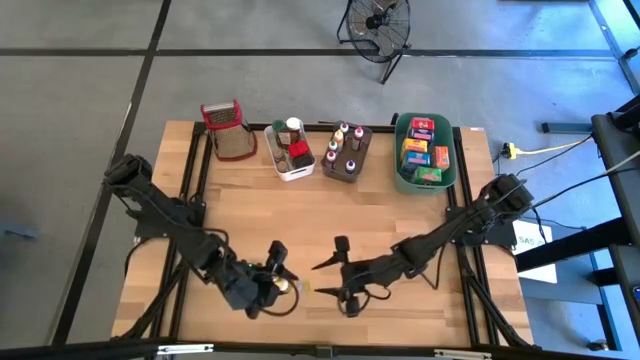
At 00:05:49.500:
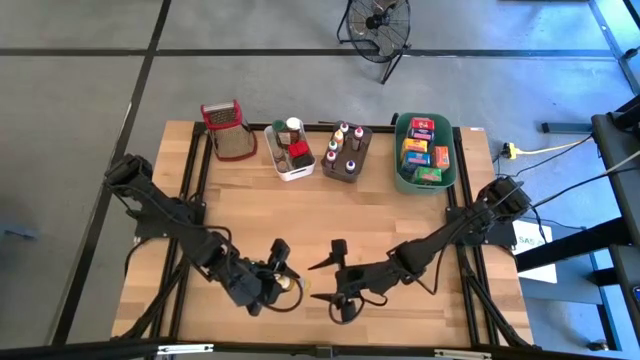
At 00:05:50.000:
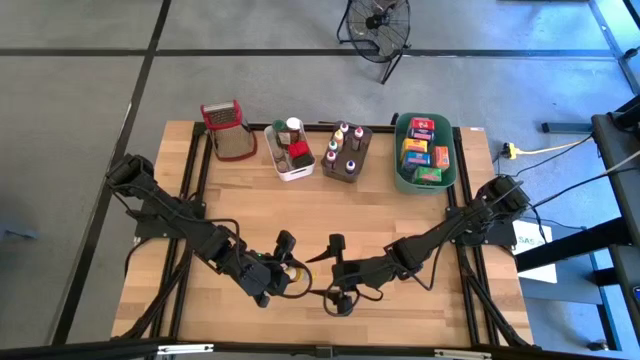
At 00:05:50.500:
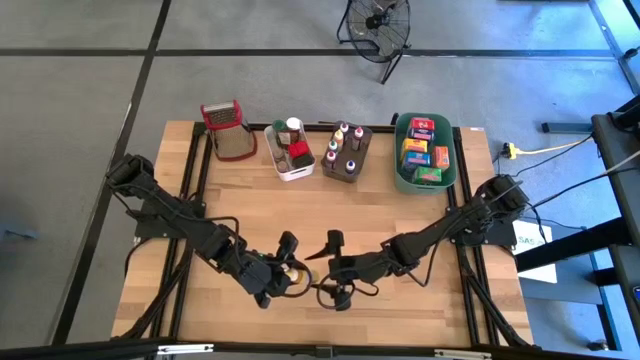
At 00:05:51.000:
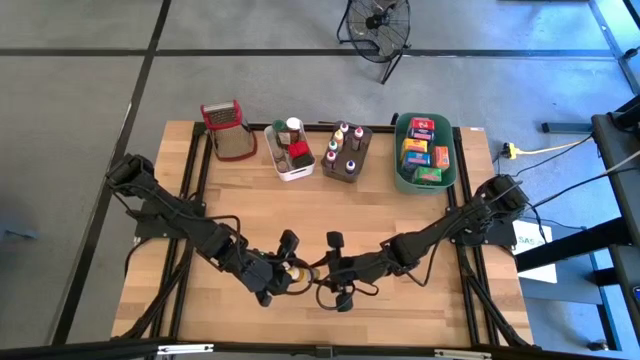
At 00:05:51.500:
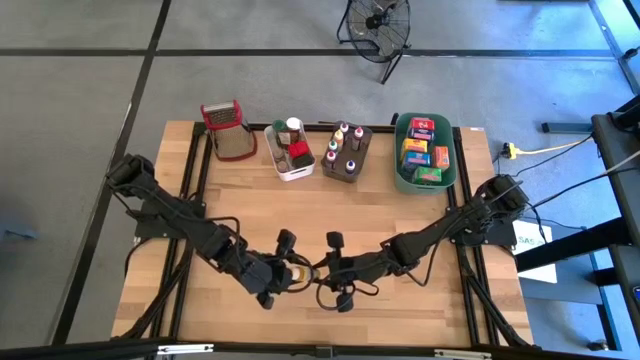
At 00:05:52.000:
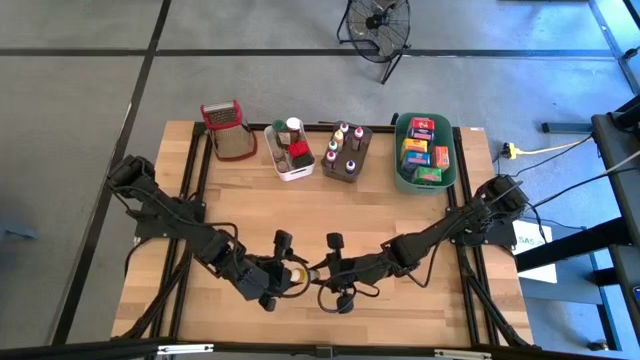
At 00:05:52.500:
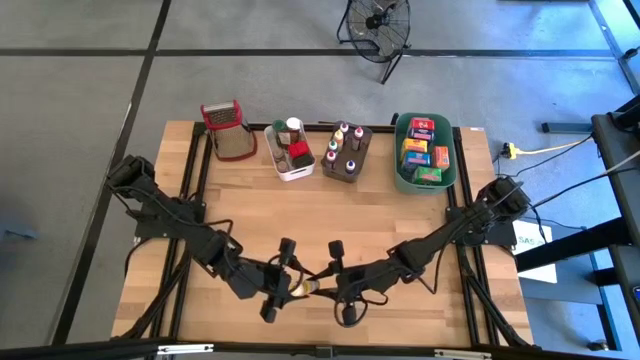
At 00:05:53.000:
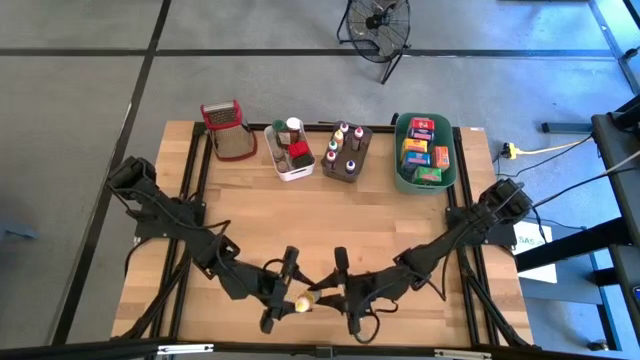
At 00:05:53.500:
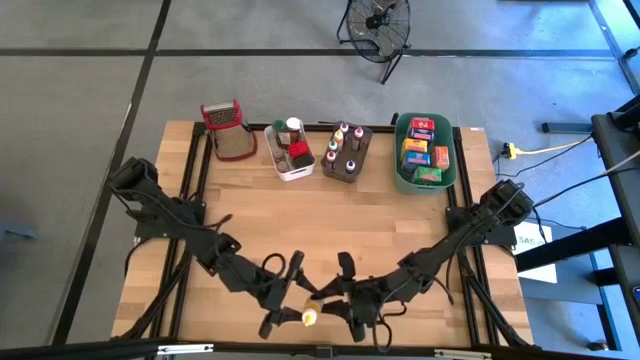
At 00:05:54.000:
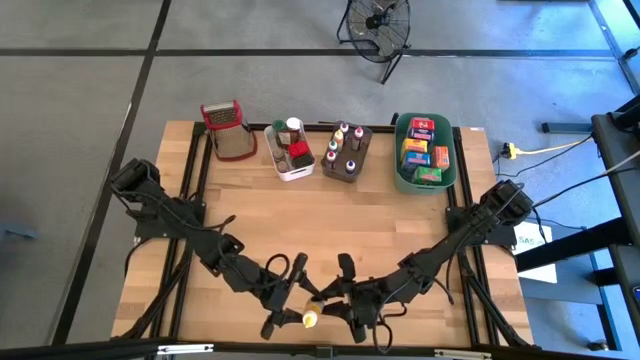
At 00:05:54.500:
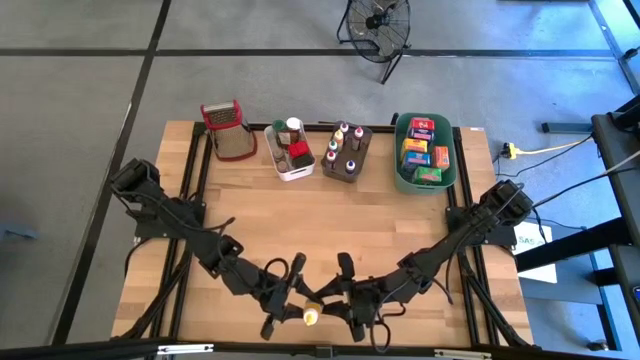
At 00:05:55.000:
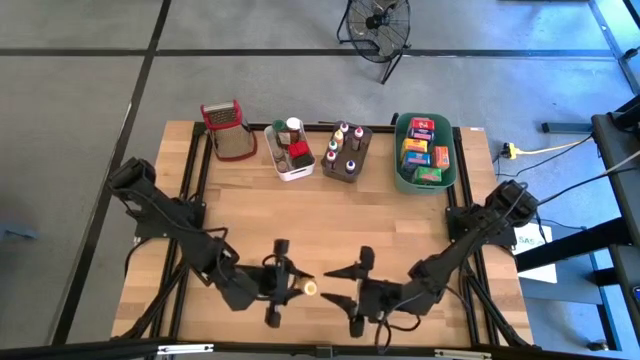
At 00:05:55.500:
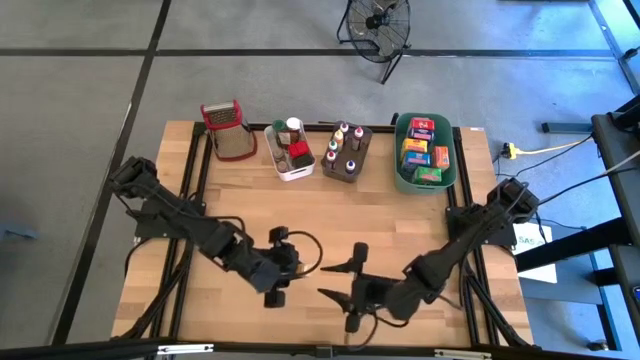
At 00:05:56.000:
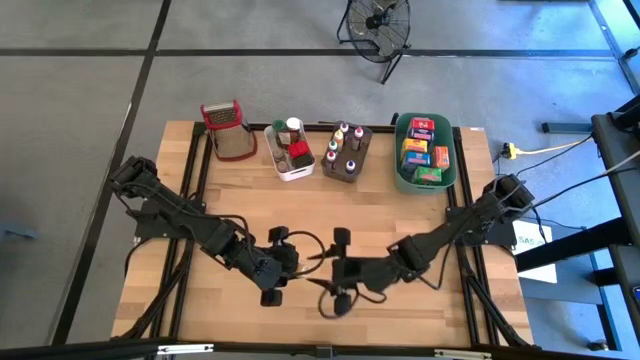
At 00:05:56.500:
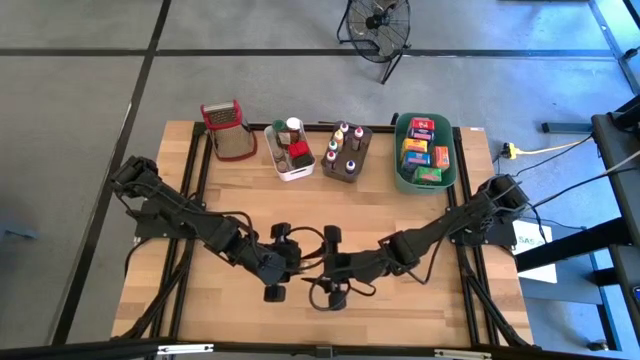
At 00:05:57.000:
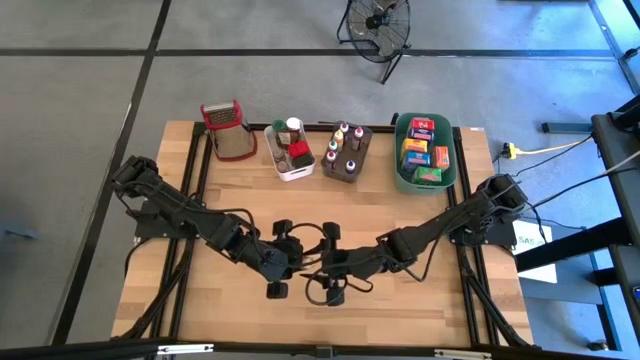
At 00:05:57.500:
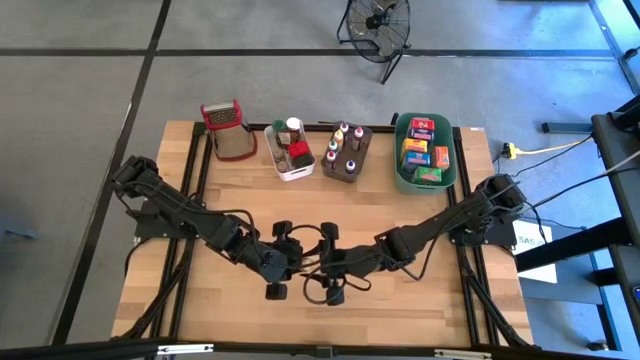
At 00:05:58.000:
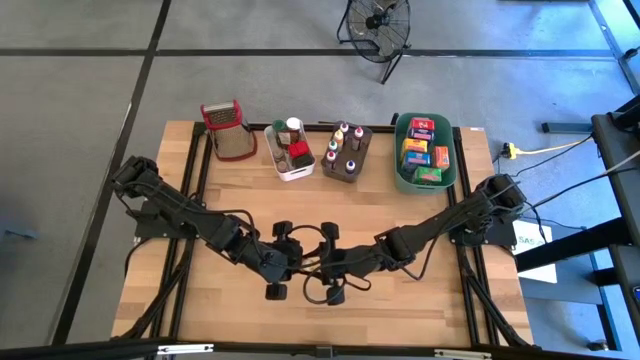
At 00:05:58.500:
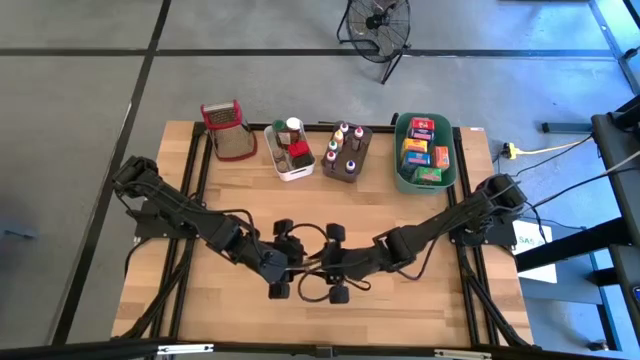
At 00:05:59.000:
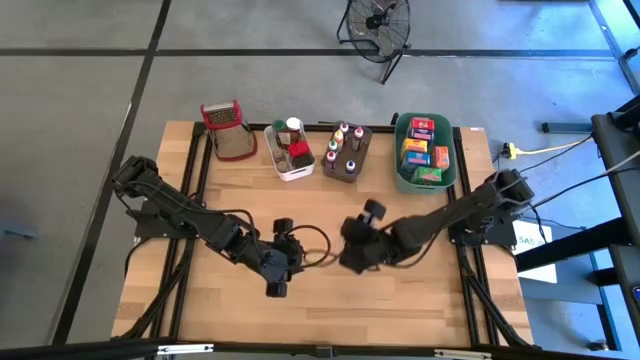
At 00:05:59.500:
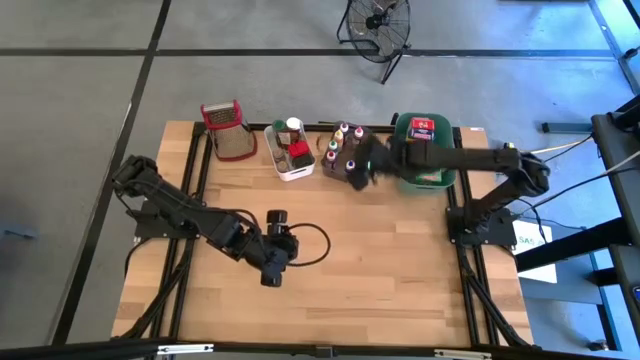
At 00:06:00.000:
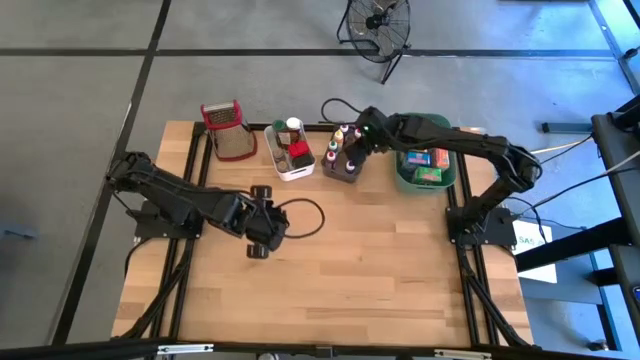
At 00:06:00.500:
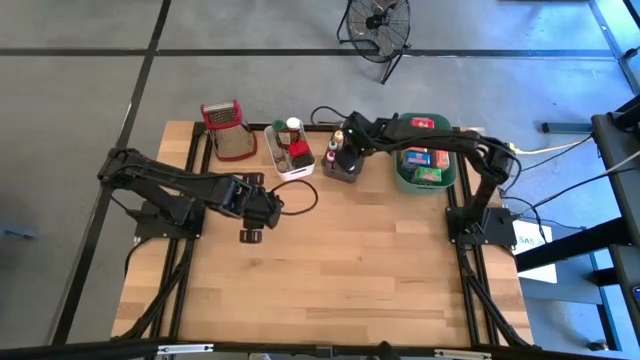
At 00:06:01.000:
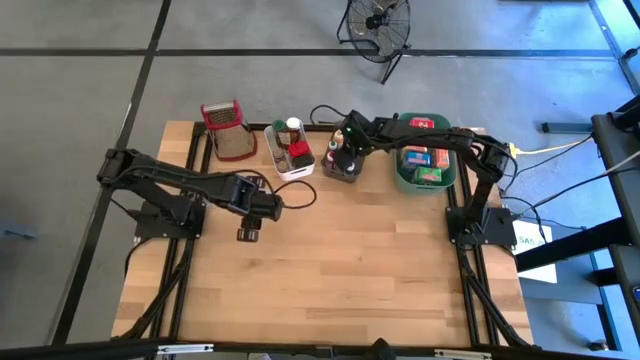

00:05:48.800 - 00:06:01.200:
Task: Pick & Place Kitchen Items
Put the yellow coloring bottle into the black transparent bin
